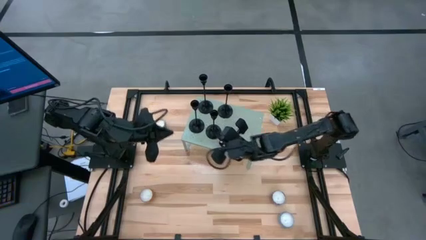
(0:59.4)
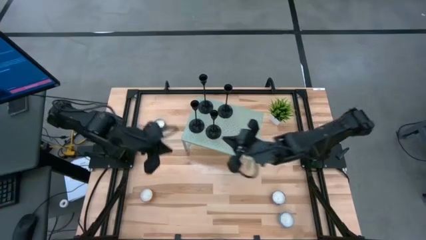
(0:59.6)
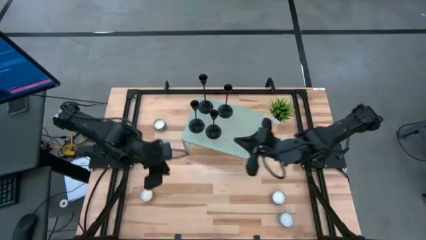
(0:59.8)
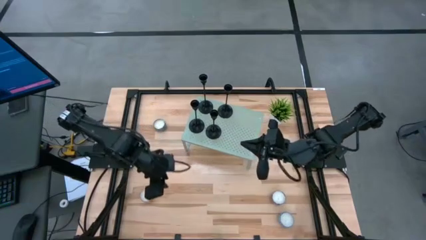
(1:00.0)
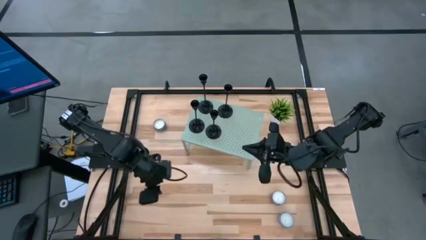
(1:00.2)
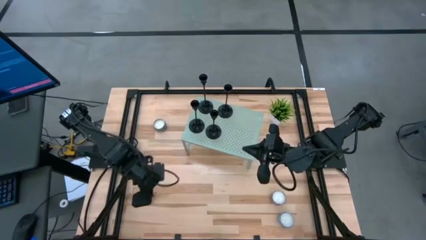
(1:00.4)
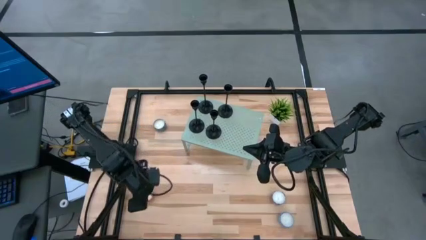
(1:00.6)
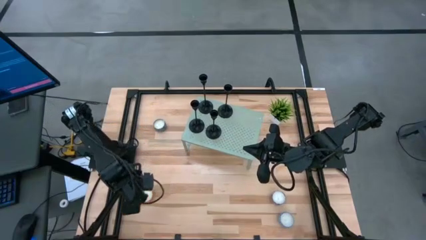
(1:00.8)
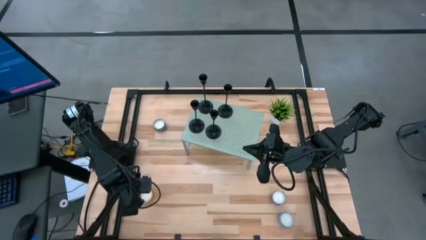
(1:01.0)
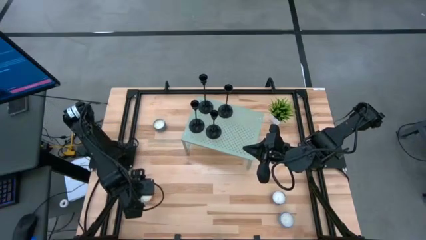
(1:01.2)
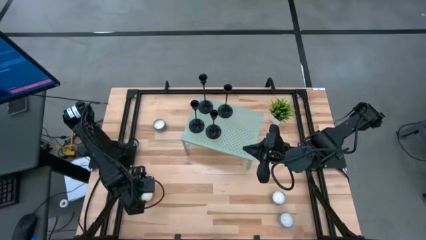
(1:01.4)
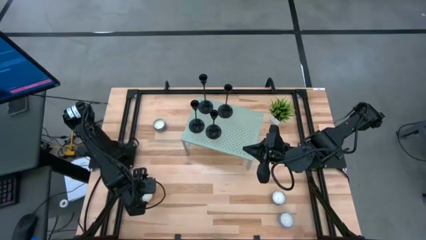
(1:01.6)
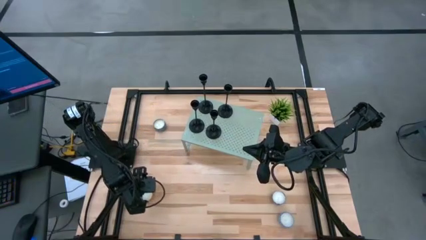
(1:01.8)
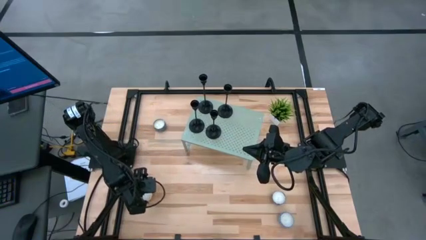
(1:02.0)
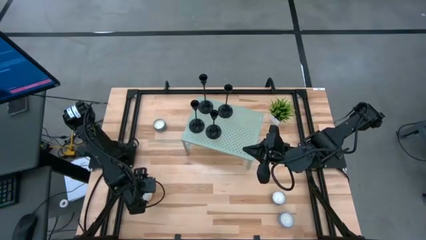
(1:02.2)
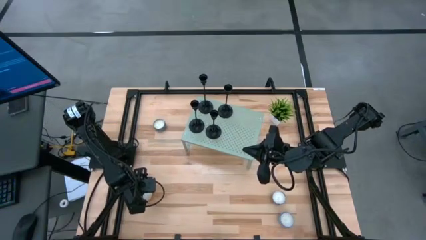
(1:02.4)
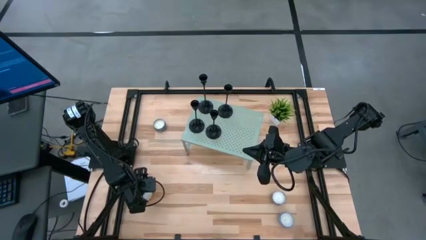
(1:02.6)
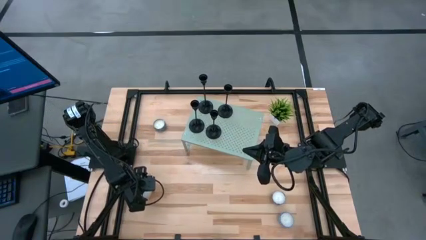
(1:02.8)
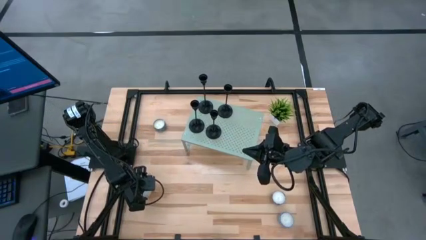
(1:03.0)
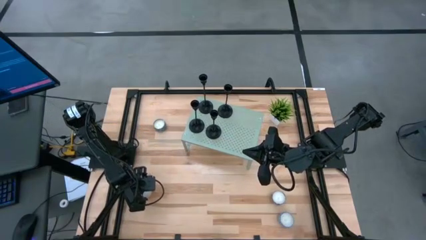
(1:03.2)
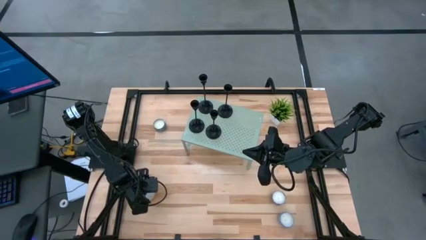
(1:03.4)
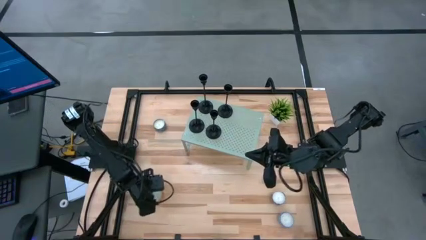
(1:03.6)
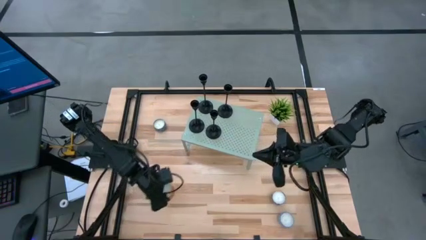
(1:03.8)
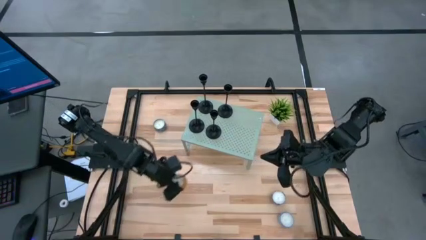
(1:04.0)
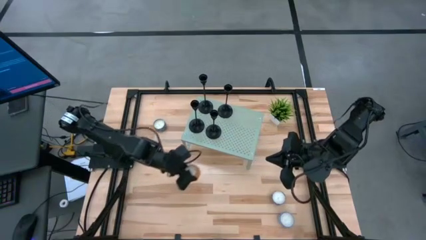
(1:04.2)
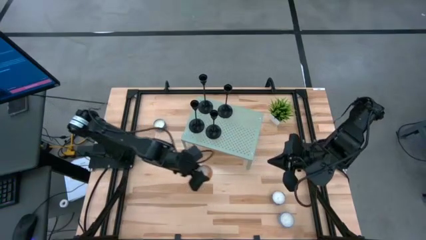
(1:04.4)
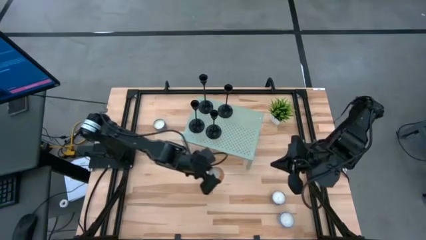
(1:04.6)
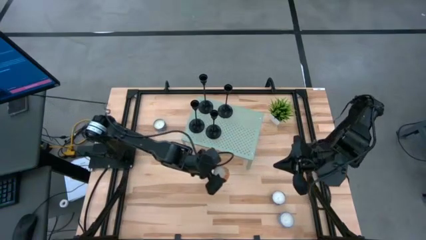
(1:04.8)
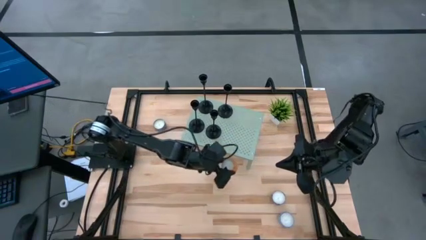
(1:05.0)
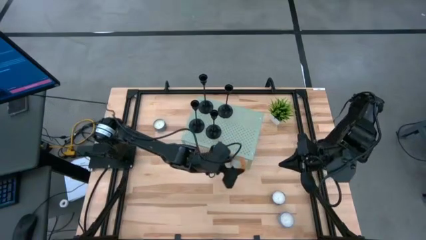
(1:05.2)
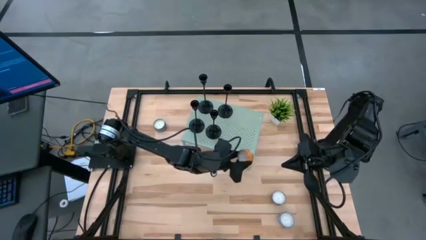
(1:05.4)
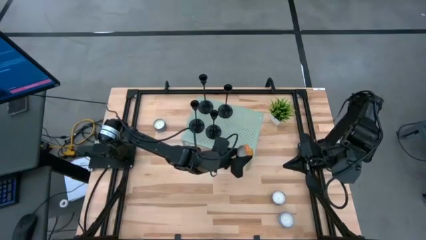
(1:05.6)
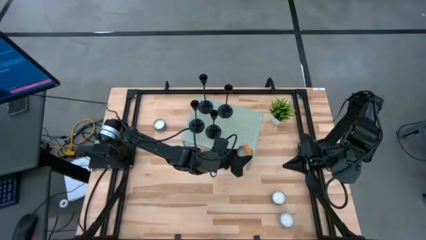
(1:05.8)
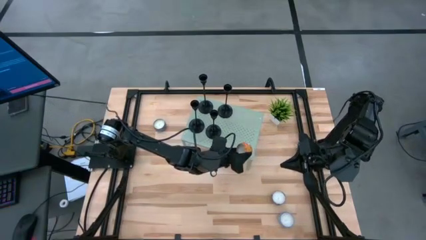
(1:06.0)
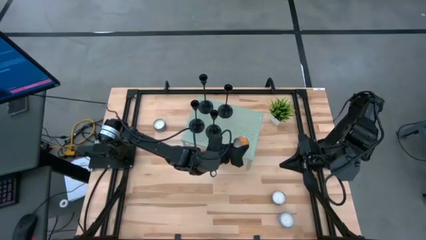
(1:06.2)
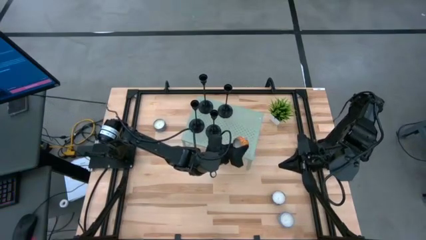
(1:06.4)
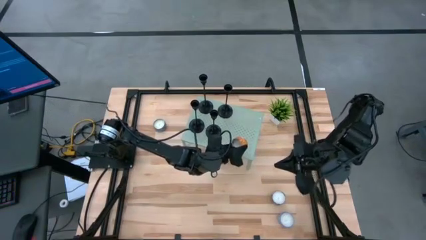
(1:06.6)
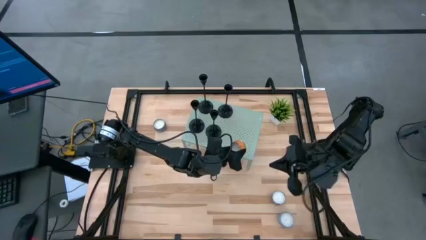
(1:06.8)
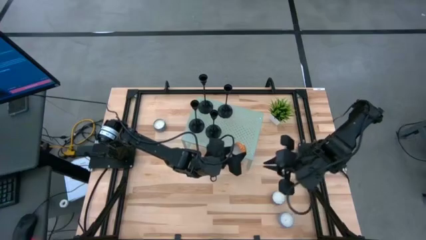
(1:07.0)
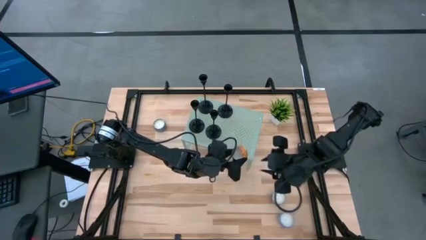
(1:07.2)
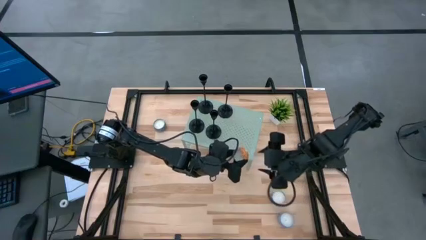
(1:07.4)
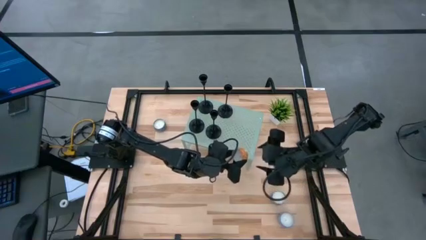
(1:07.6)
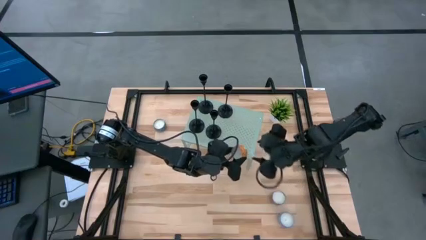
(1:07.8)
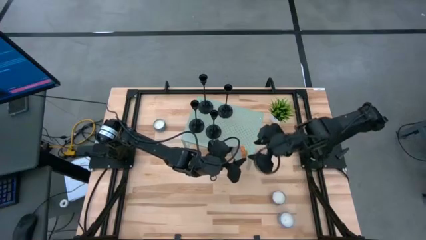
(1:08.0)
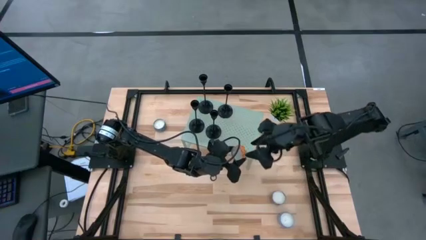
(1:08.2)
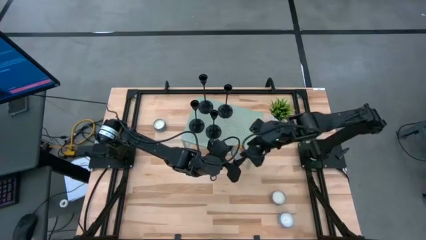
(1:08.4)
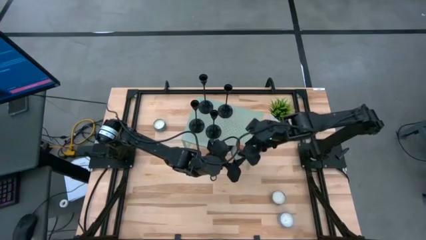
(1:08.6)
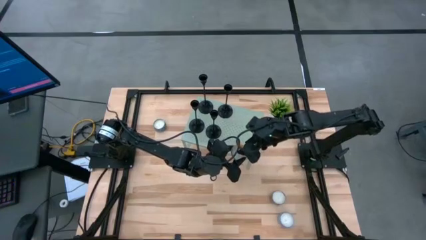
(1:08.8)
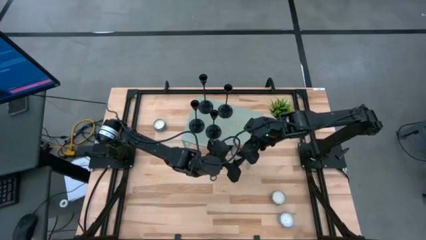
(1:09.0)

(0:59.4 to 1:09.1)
Task: Pick & Place candle stick holders
Put the orange scented candle on the shelf

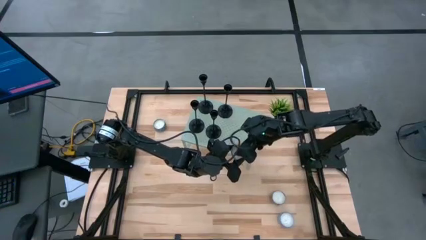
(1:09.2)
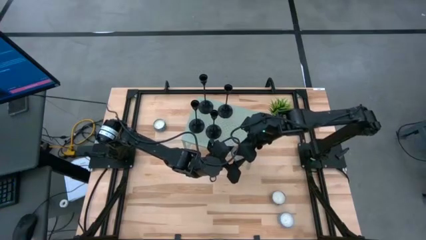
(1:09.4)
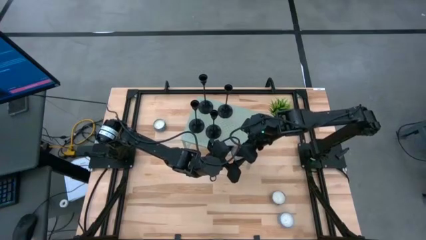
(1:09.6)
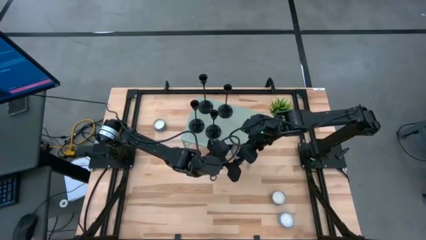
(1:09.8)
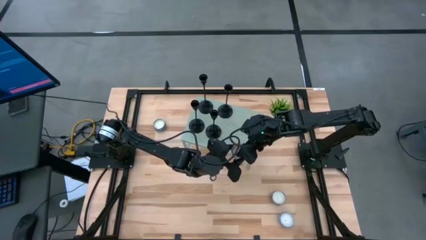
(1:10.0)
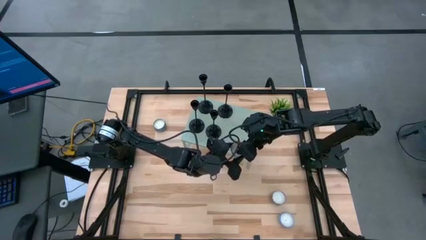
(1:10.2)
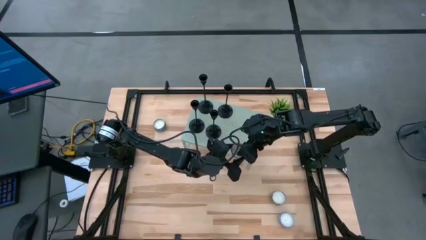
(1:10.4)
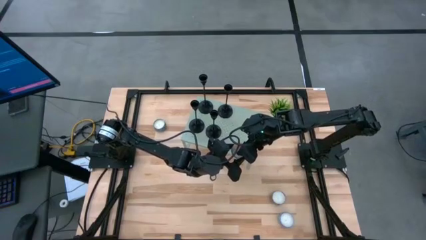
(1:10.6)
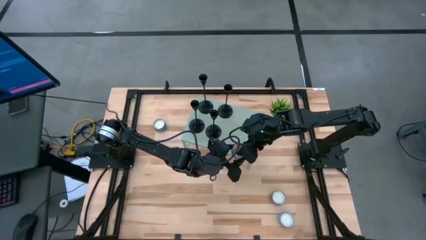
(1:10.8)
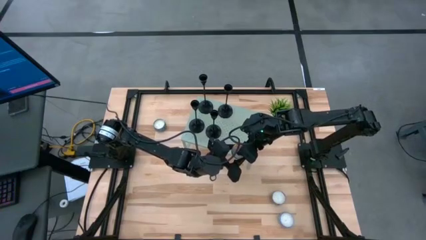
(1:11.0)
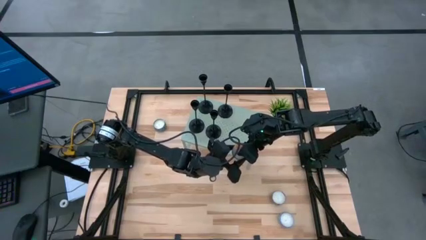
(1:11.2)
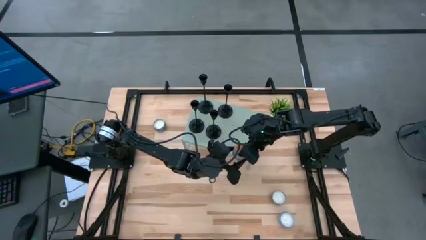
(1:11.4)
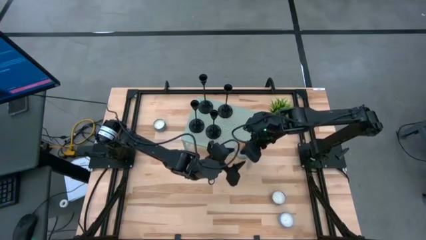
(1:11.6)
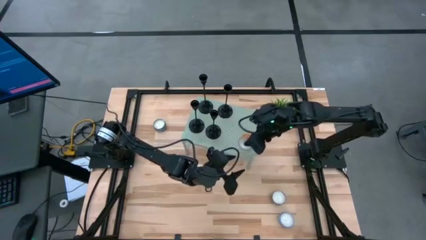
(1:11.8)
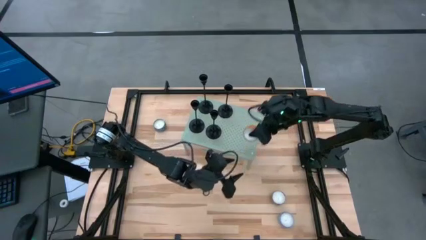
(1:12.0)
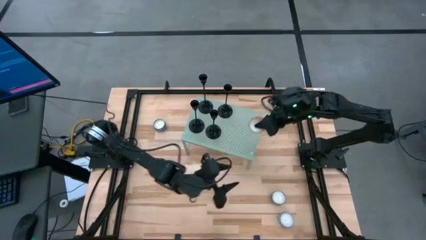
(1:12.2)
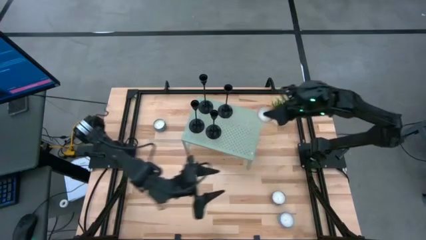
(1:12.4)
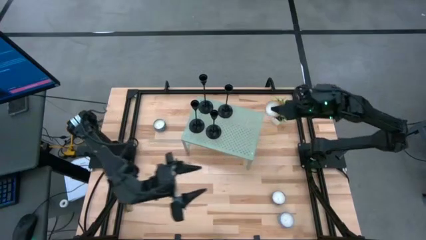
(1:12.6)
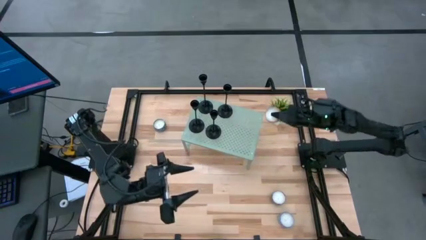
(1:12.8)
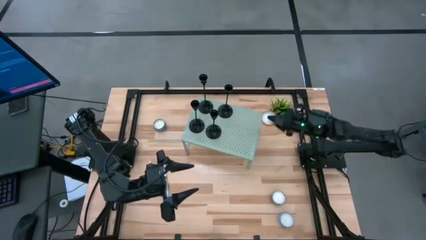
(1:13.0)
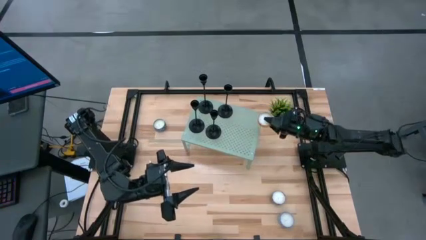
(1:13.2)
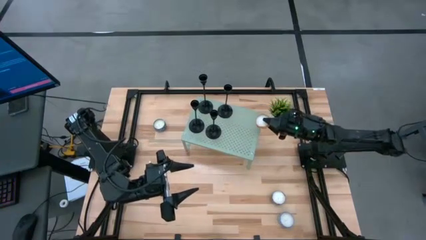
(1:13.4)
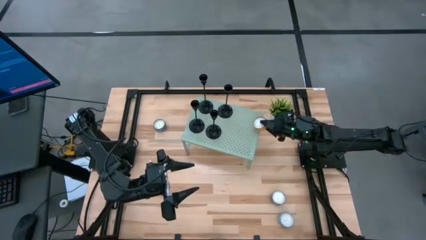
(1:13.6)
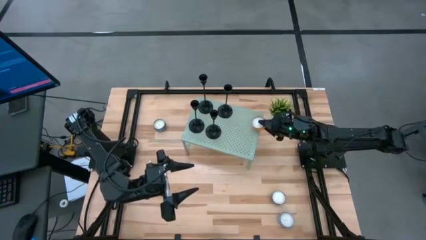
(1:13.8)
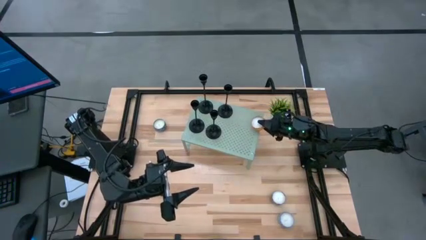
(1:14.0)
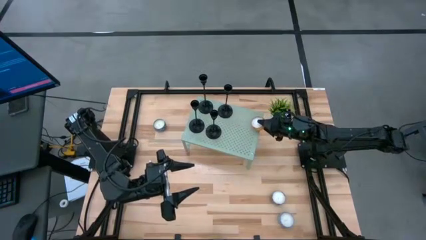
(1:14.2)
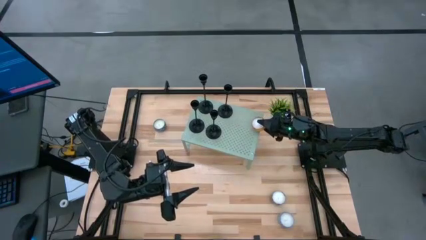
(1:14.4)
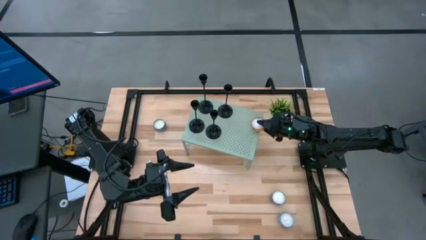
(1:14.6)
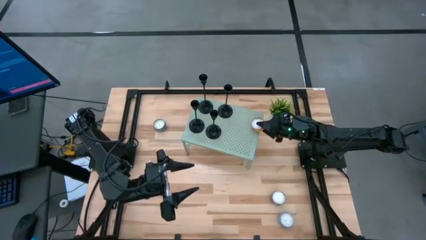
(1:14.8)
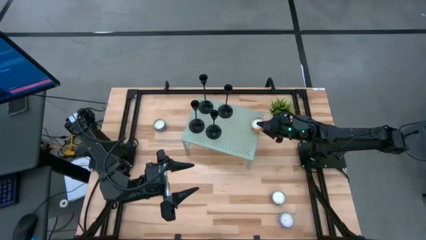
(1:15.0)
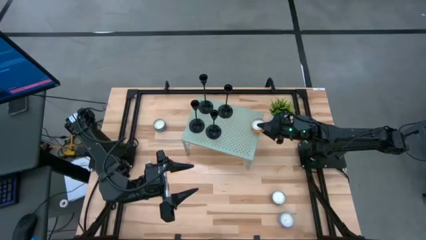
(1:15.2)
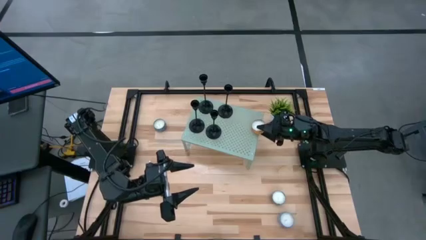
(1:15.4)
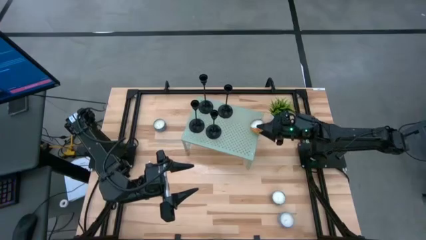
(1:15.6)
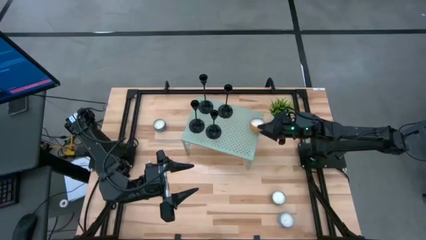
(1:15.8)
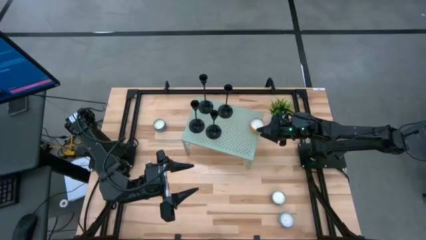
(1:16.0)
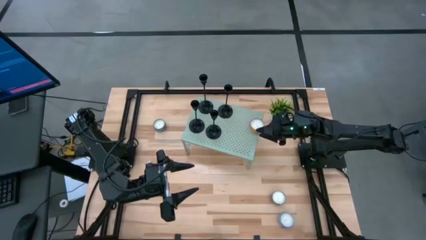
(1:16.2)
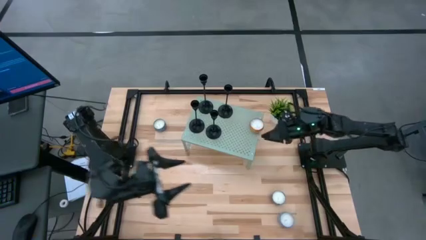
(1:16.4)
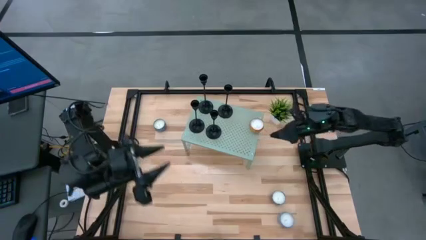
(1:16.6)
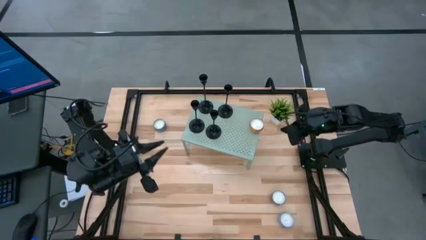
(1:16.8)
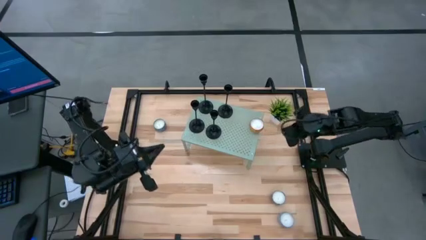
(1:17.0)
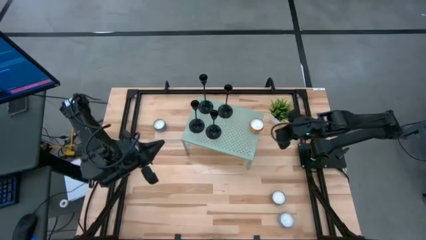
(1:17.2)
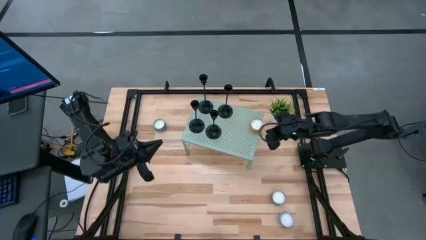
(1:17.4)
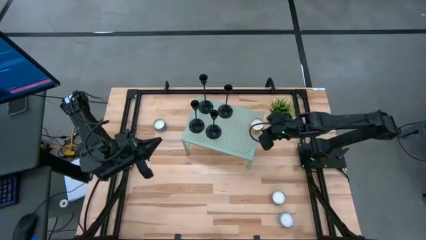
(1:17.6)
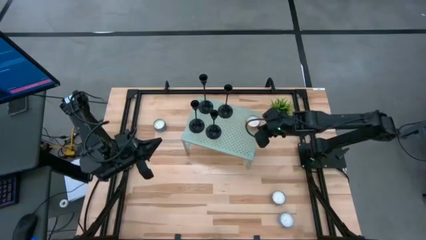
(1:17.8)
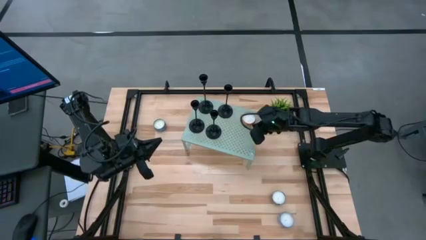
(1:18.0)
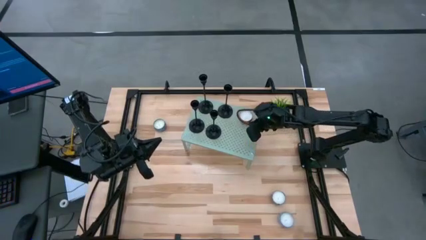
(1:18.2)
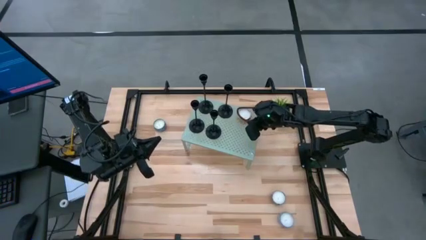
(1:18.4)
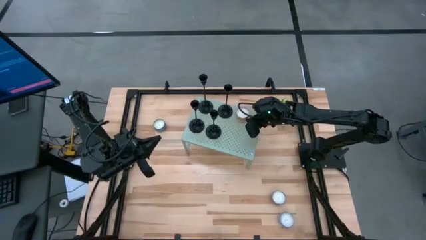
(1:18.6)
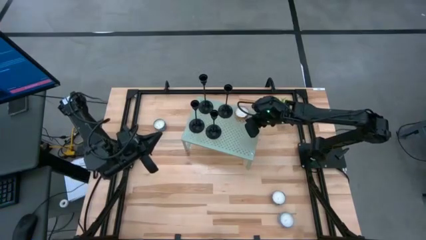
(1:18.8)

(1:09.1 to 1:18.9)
Put the orange scented candle on the shelf
